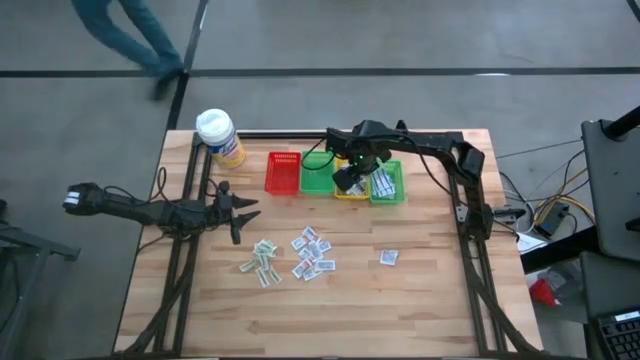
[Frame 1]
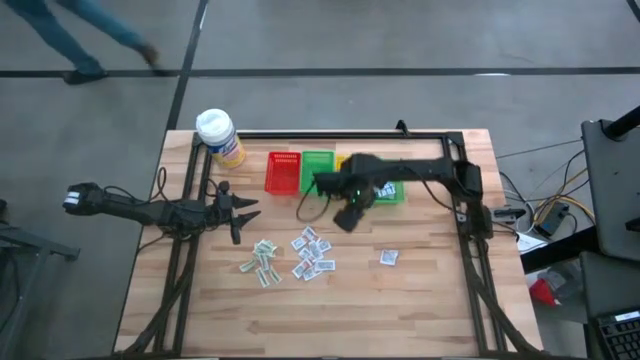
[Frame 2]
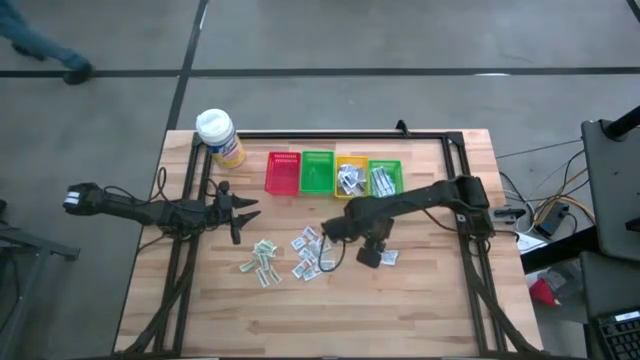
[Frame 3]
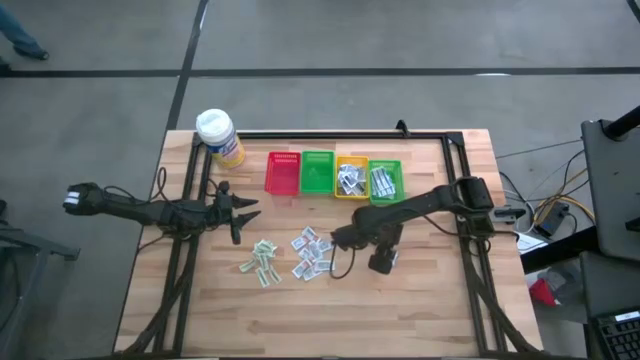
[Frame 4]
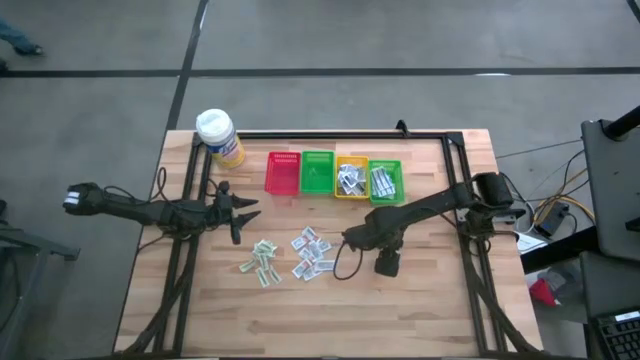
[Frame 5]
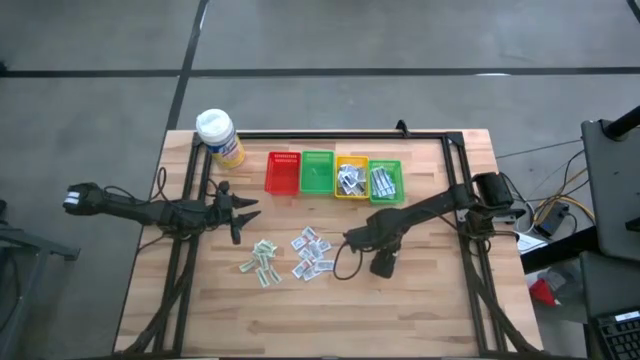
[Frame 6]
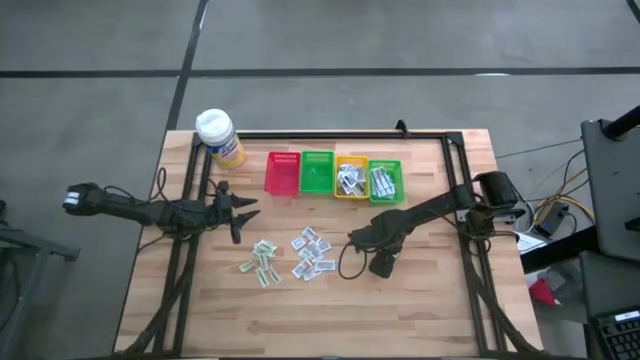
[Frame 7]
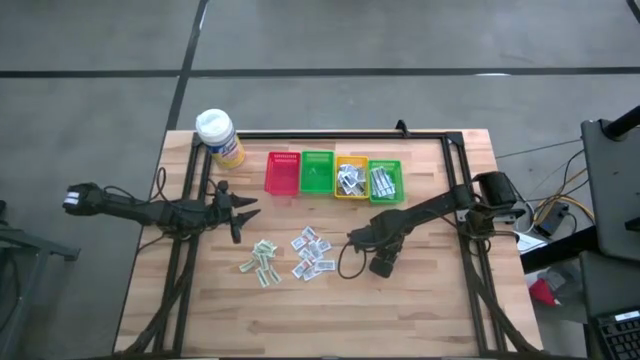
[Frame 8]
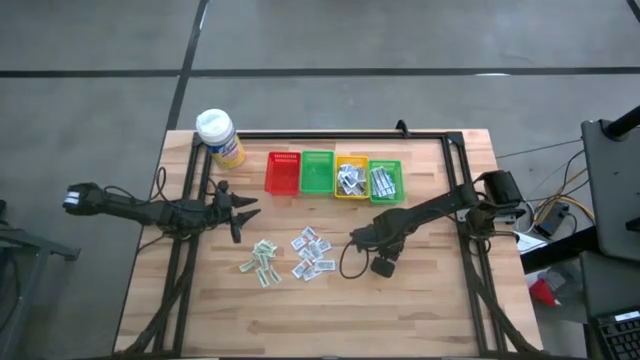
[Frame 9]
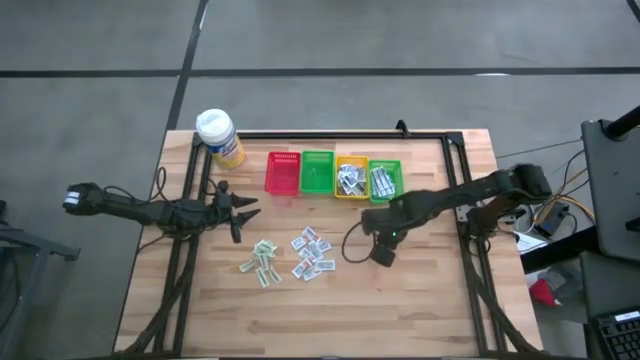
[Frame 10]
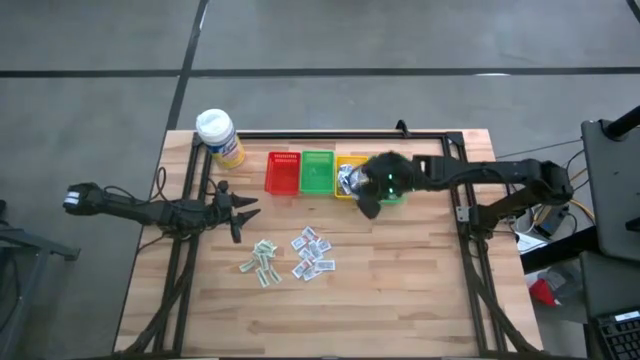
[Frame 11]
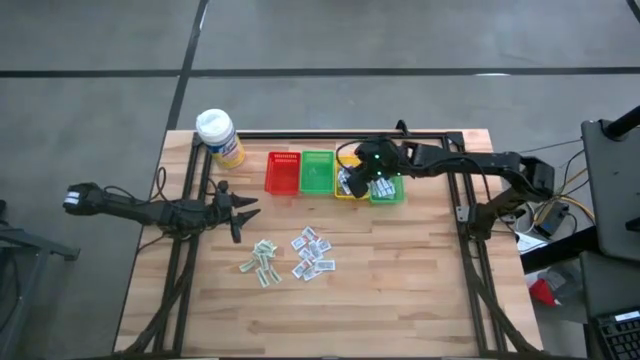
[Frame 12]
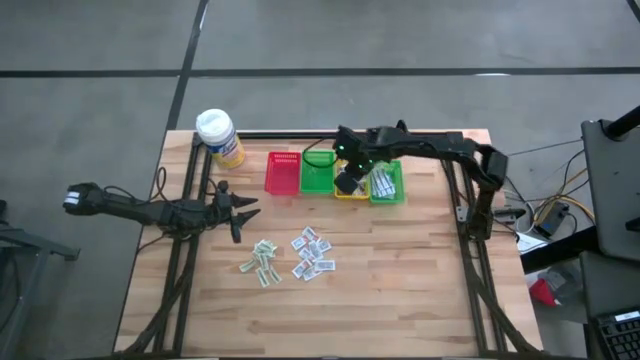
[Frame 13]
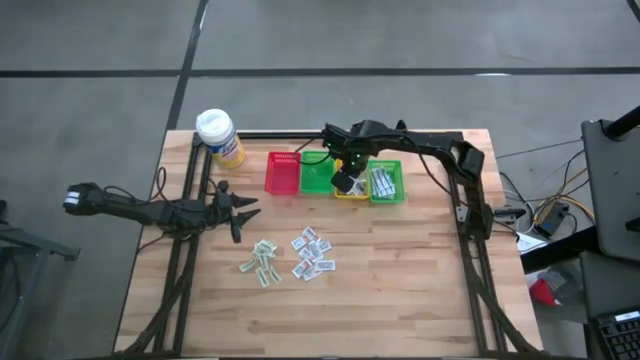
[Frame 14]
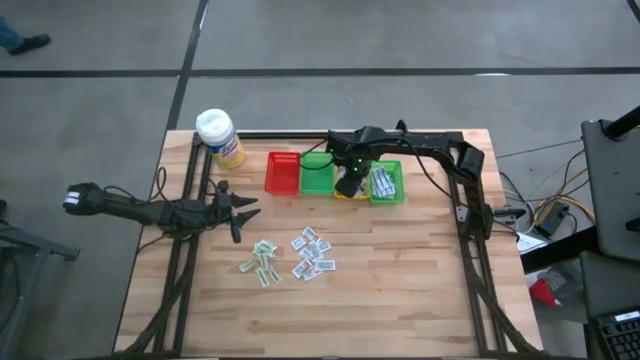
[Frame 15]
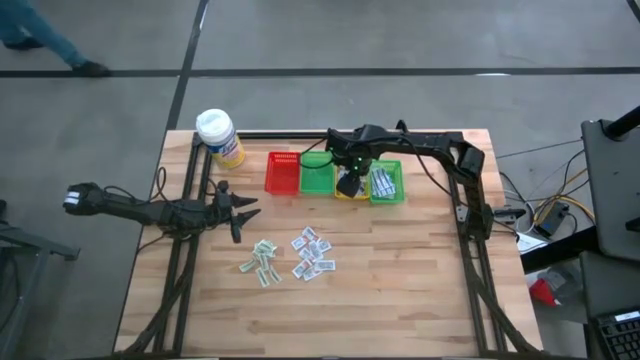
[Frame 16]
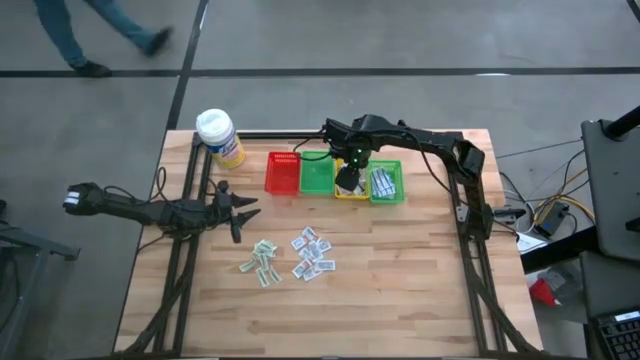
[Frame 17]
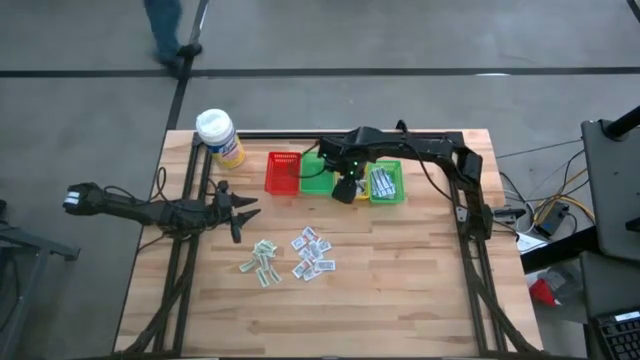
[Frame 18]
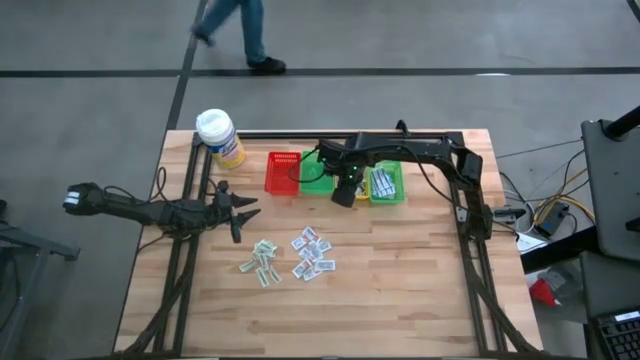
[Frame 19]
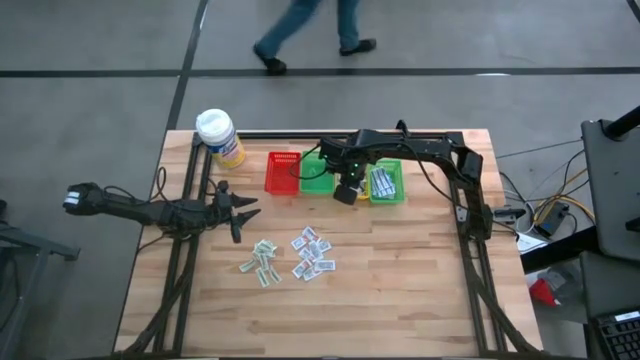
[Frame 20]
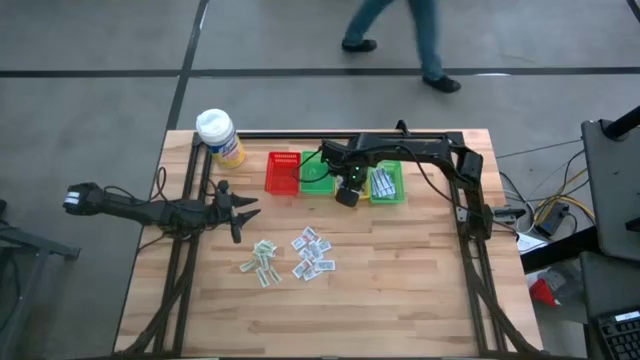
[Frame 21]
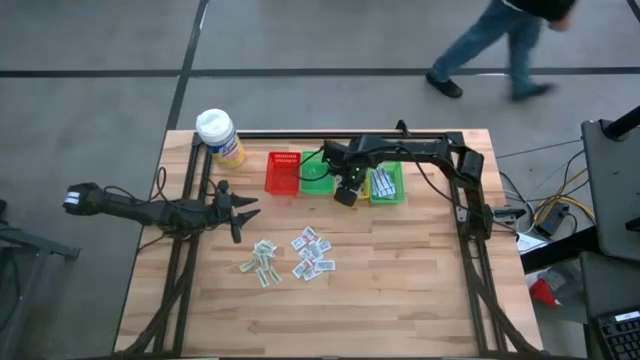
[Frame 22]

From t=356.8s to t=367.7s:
Task: Pick & Place First Aid Supplies
Put the blue alcohol pad into the yellow bin

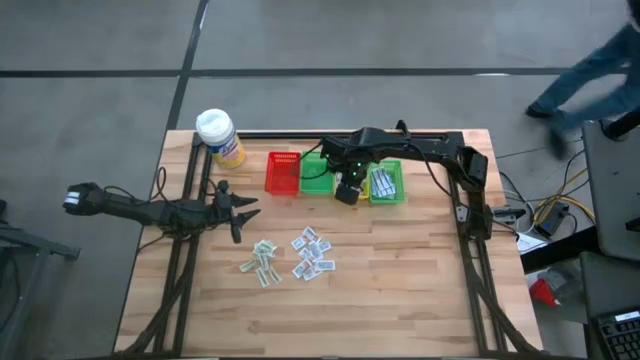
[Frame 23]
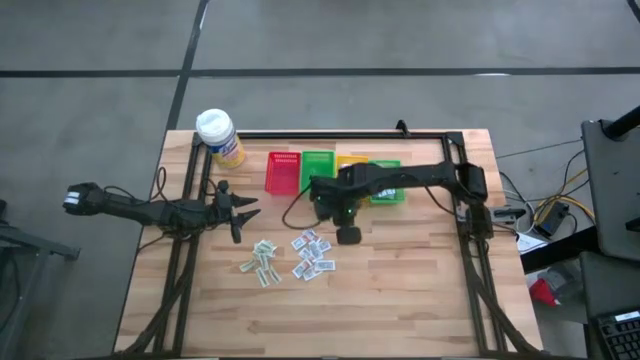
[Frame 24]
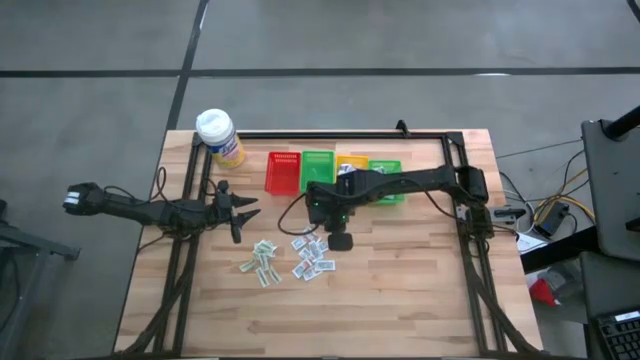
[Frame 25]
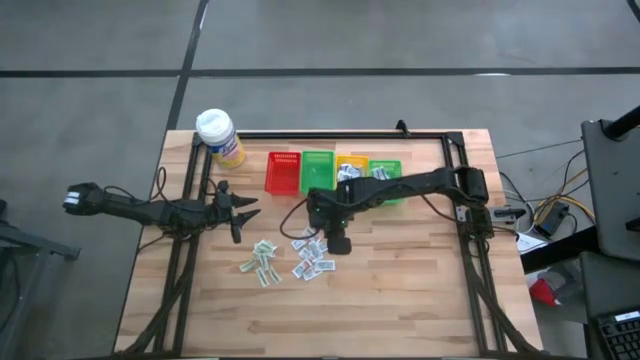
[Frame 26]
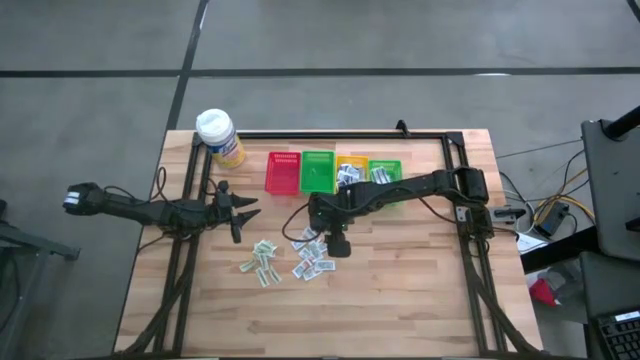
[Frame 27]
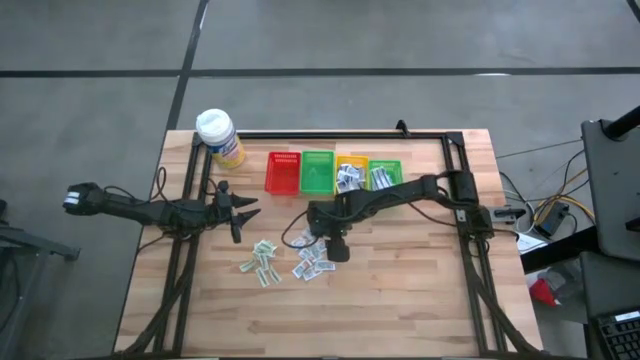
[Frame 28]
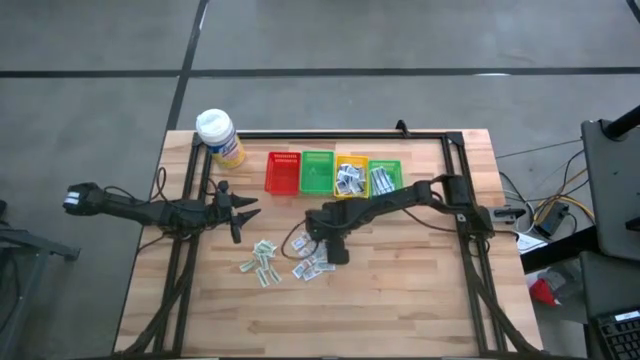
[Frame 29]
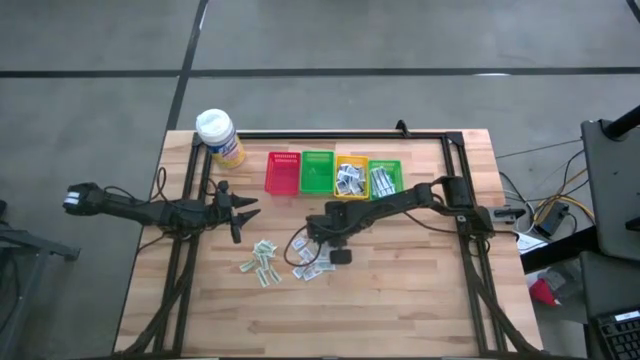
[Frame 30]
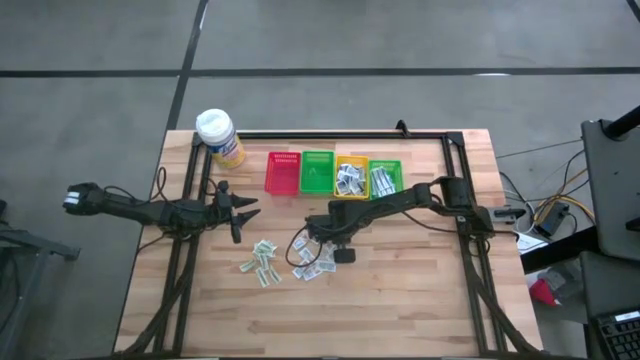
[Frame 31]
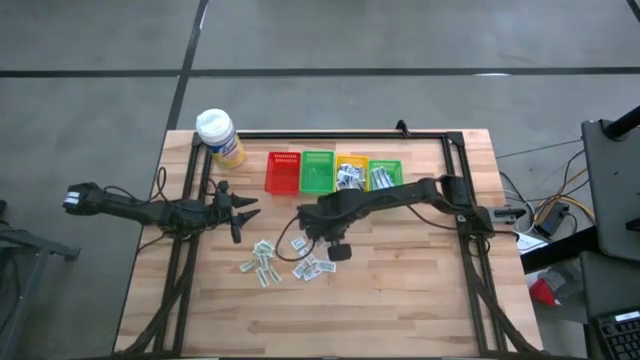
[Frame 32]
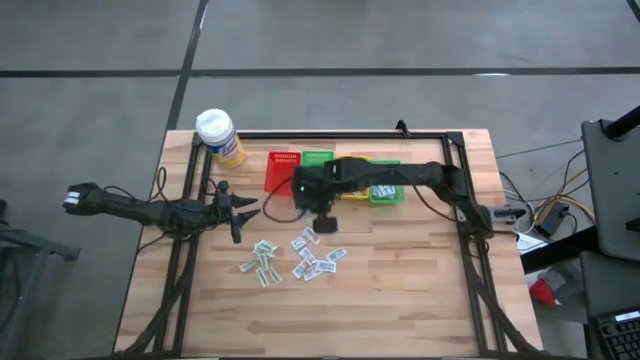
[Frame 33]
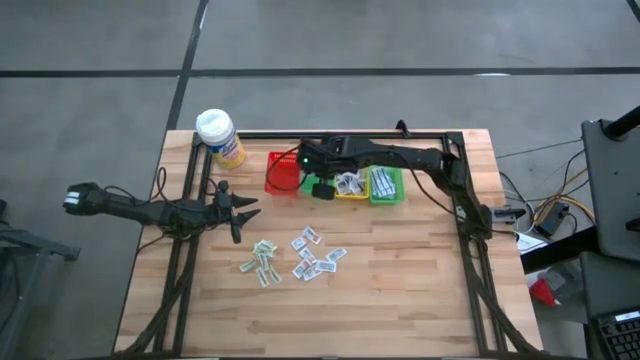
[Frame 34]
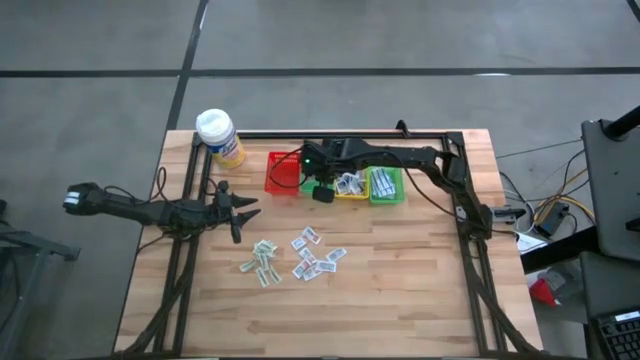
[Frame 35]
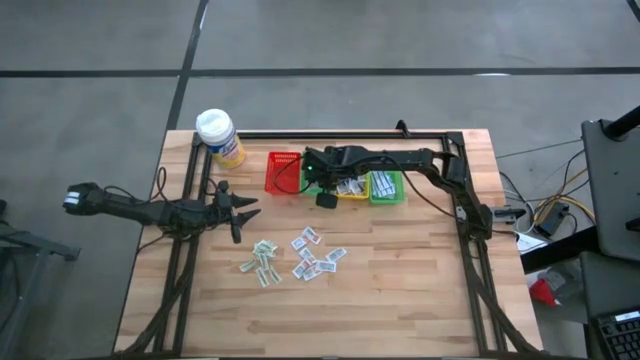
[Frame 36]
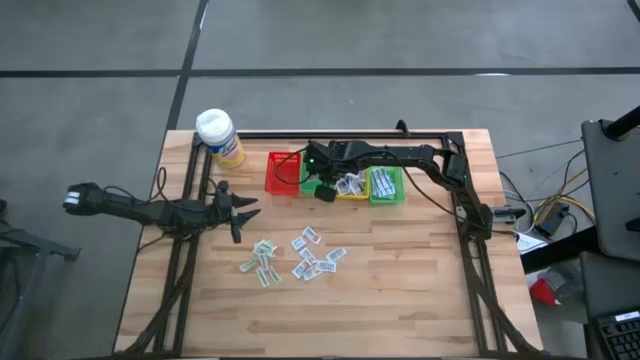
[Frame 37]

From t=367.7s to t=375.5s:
Put the orange ointment pack into the left green bin

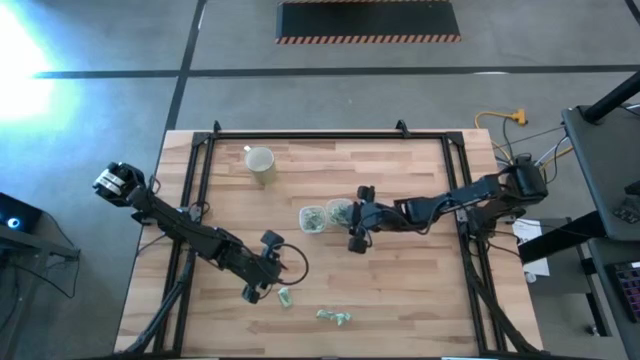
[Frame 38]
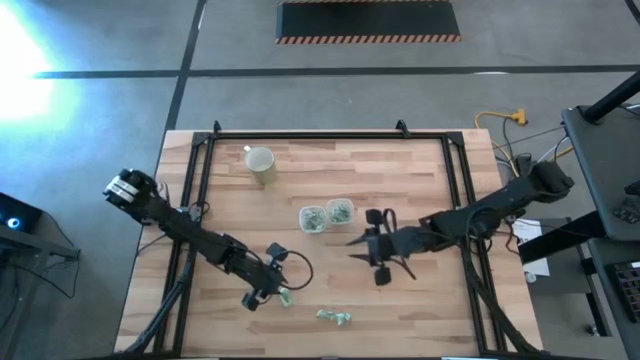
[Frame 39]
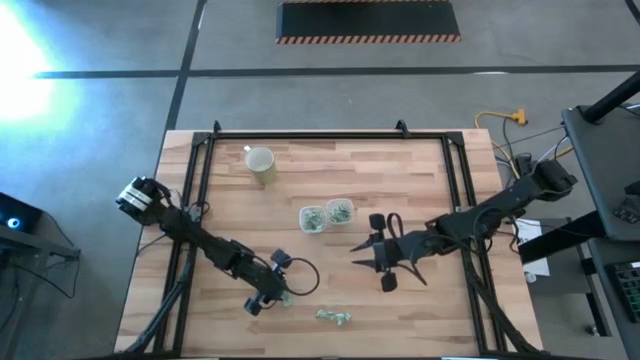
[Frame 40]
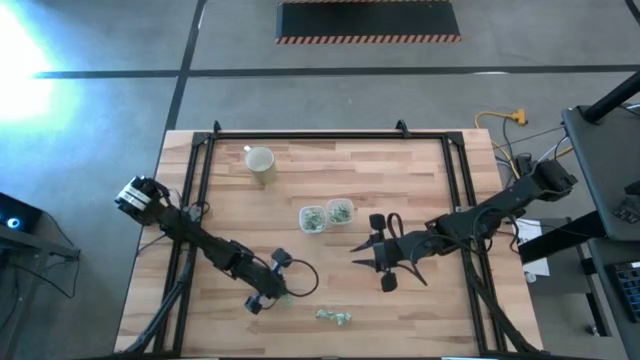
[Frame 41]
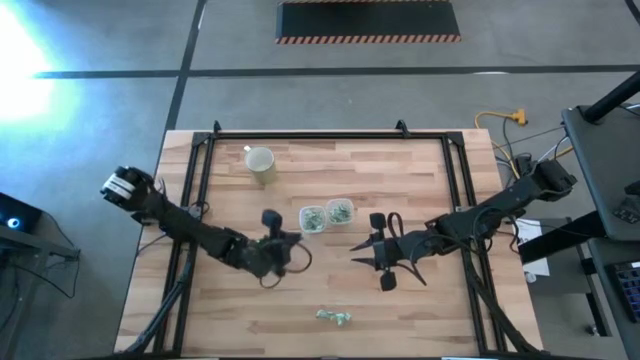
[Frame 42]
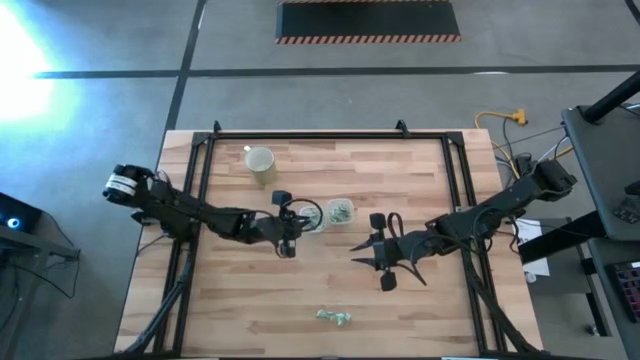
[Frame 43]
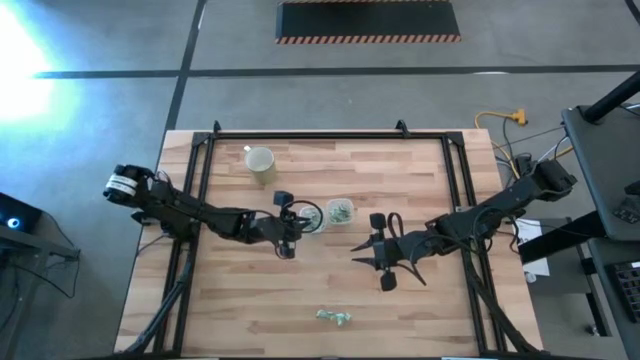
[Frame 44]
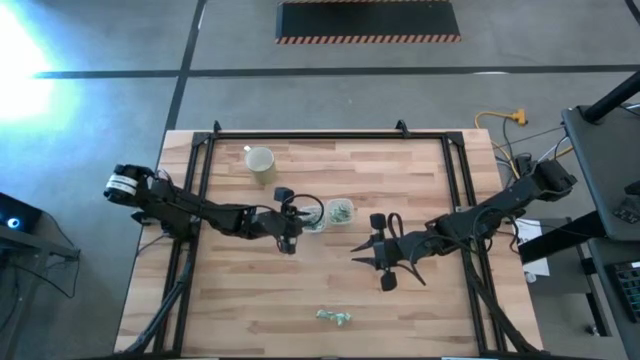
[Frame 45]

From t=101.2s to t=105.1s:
Task: Pick and place items into bin
Put the stevia packet into the left transparent bin
